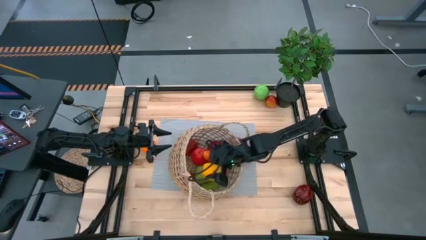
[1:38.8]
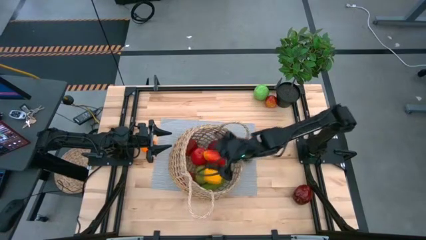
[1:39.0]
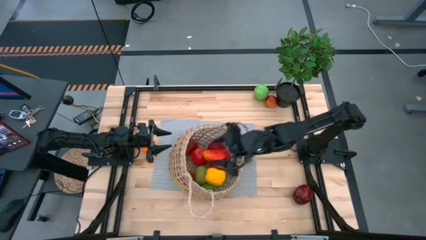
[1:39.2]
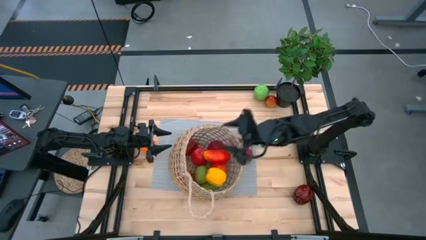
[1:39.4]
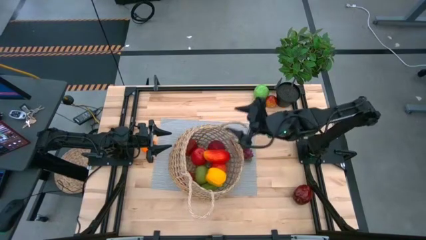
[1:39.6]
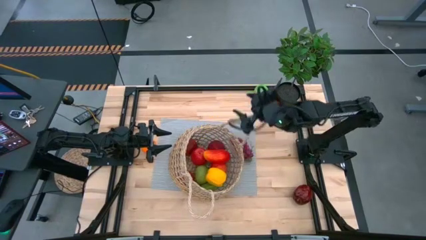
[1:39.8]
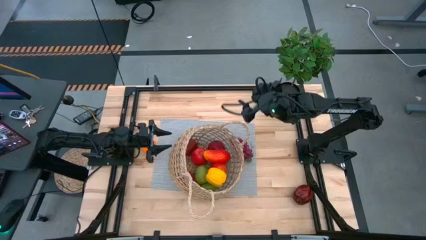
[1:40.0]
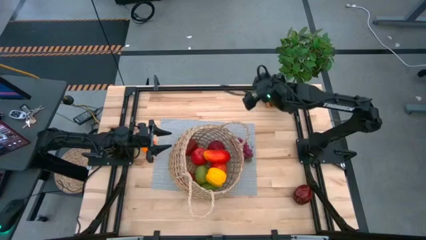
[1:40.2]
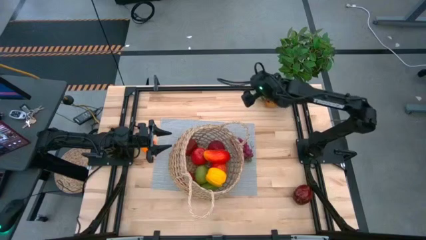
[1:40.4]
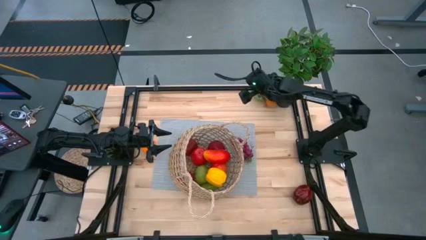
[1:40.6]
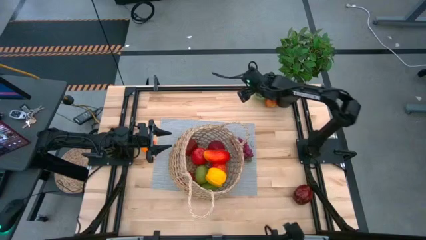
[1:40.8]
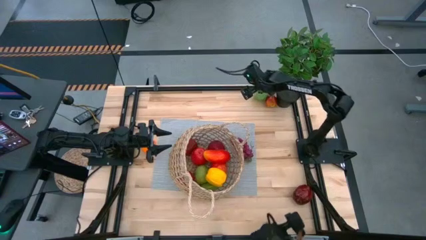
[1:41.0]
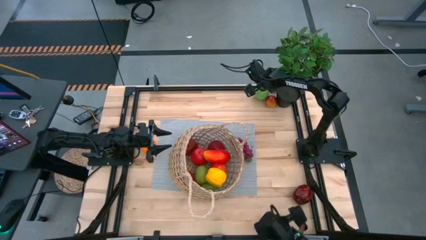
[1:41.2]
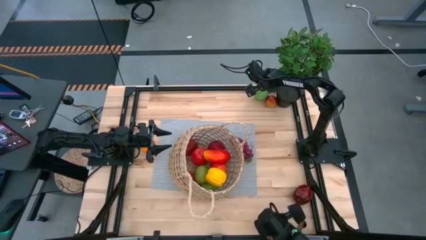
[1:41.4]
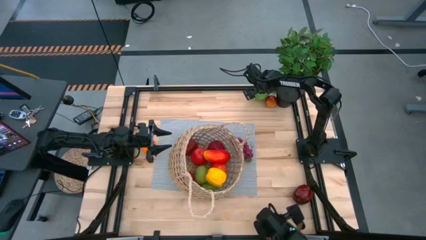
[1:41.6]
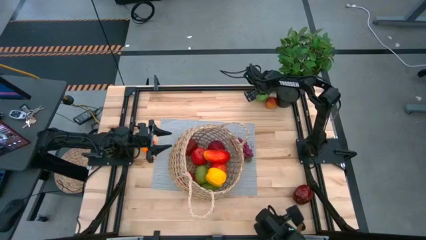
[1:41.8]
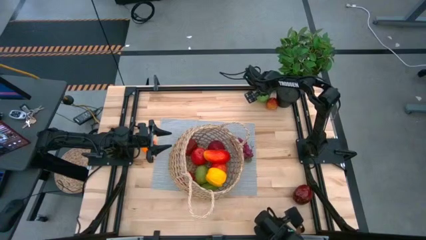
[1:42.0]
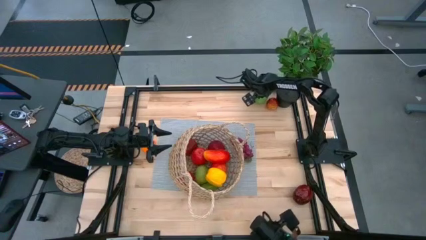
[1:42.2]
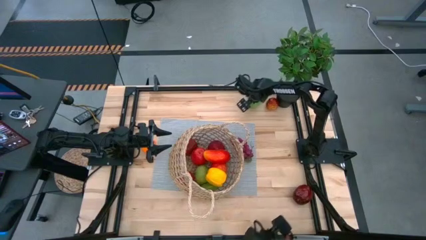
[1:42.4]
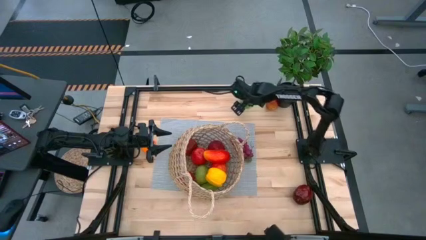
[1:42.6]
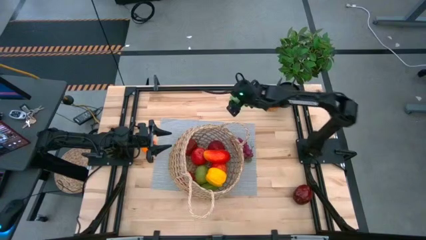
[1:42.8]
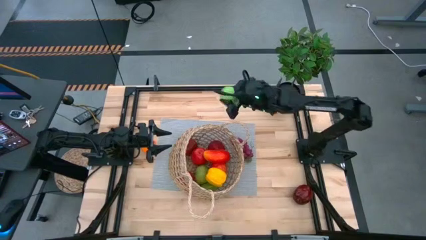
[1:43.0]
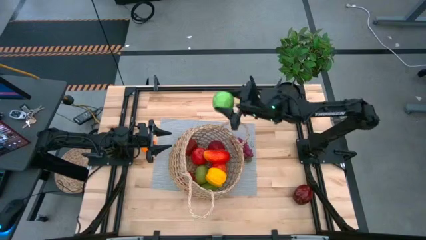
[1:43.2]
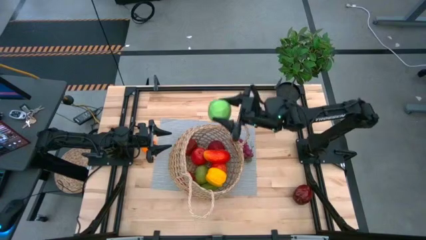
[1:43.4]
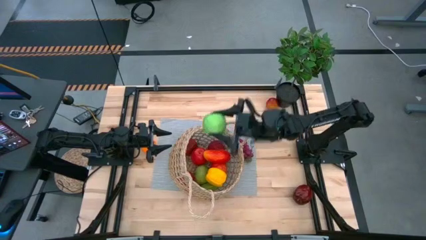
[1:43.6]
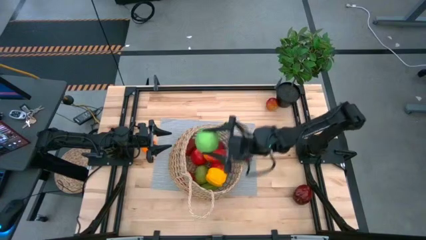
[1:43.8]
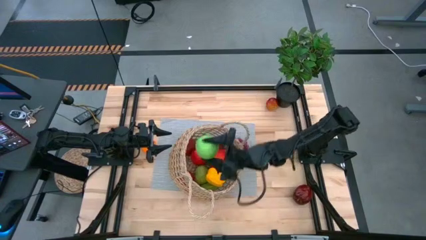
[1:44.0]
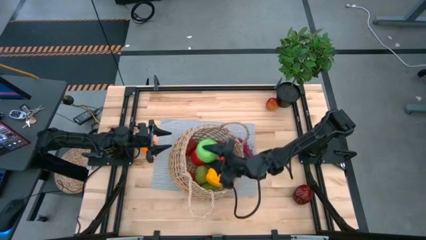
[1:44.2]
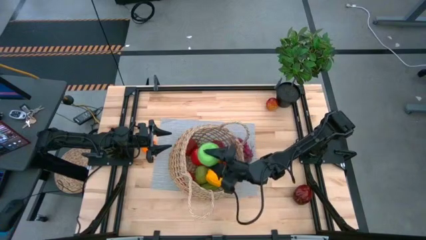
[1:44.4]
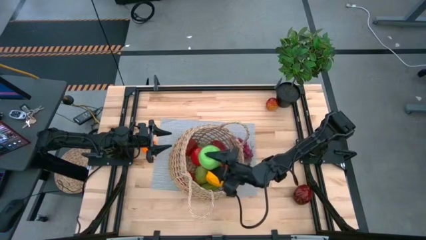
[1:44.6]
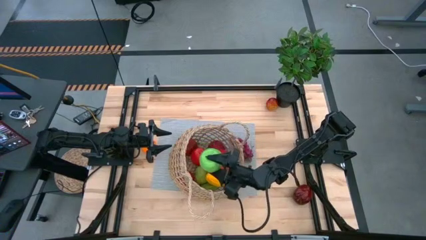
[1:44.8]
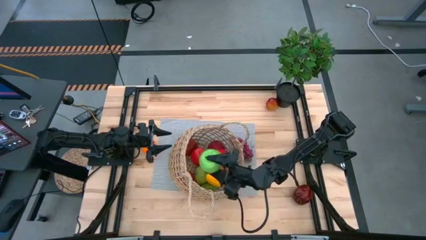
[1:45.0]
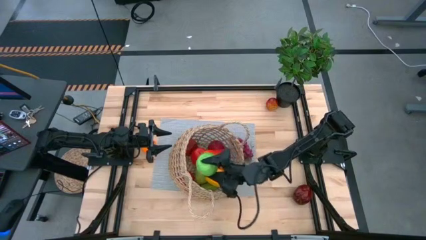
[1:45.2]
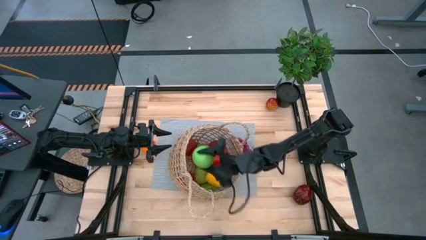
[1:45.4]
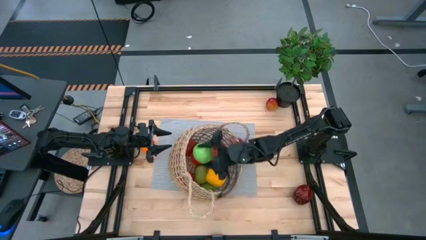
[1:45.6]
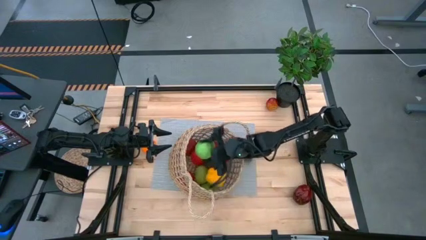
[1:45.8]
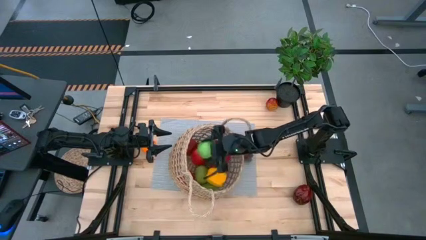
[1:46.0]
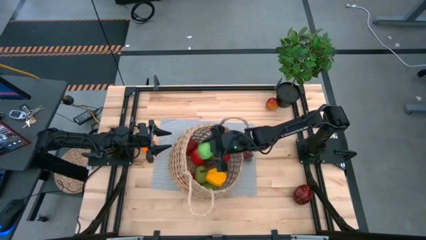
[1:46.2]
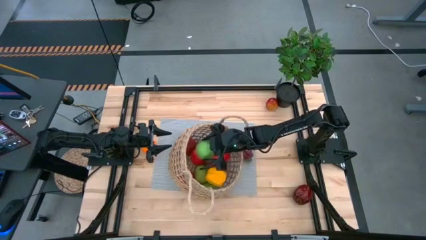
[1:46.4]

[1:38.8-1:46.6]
Task: Build produce basket
Put the apple into the basket

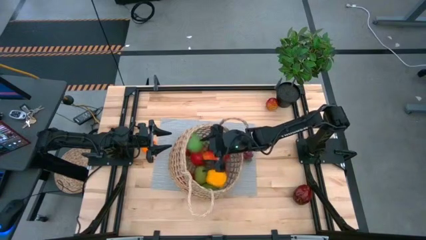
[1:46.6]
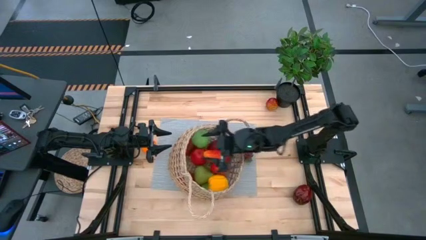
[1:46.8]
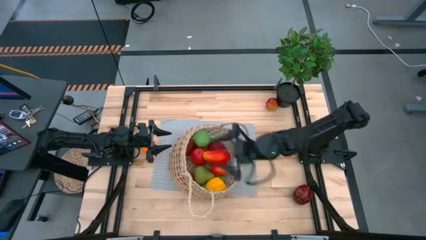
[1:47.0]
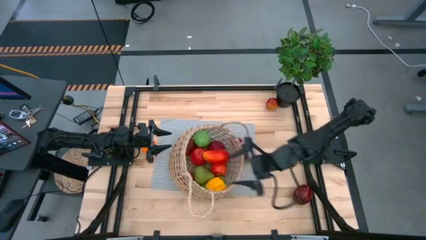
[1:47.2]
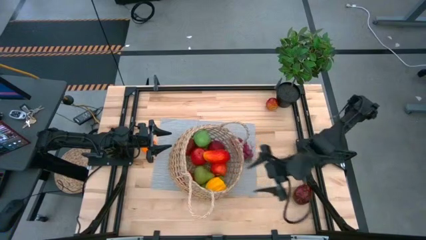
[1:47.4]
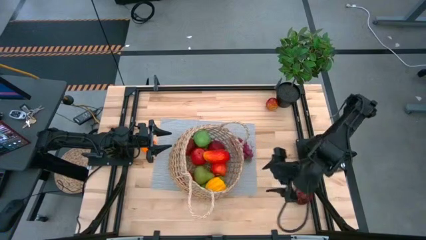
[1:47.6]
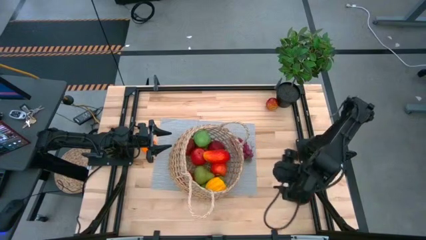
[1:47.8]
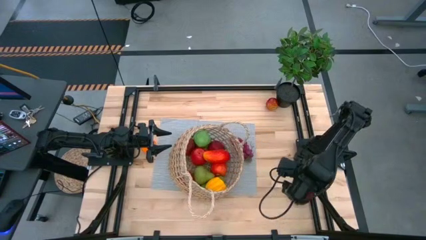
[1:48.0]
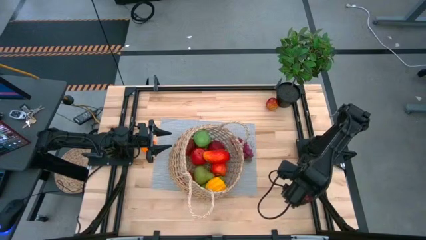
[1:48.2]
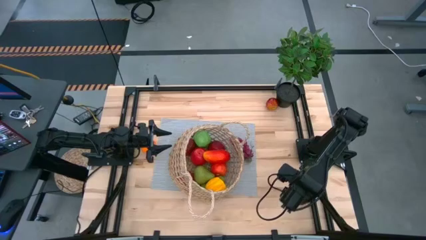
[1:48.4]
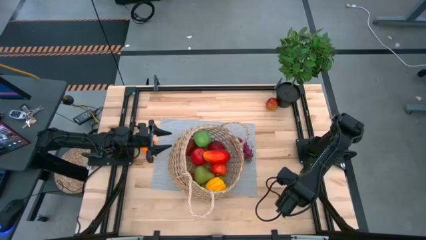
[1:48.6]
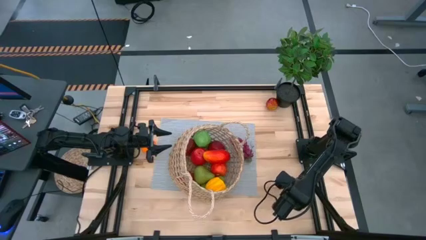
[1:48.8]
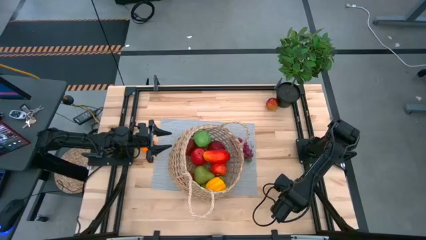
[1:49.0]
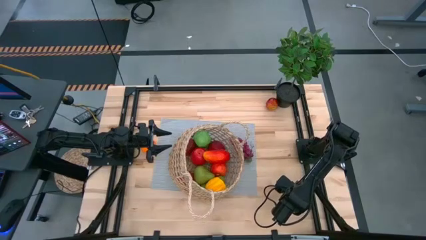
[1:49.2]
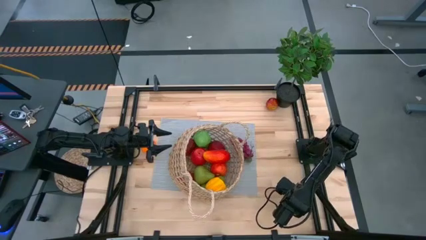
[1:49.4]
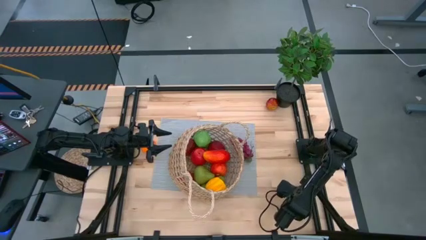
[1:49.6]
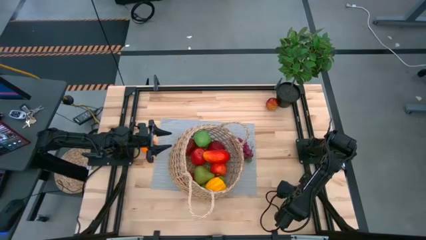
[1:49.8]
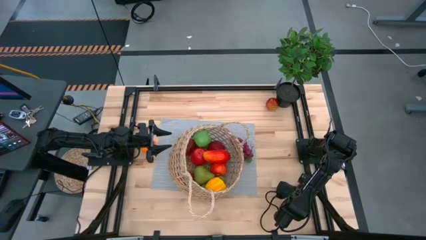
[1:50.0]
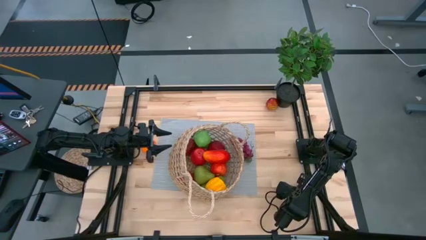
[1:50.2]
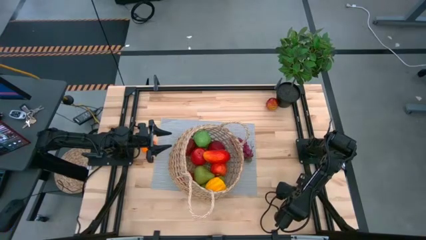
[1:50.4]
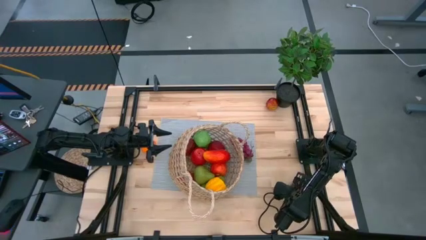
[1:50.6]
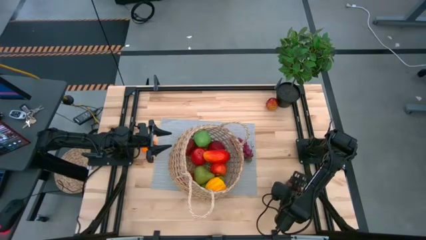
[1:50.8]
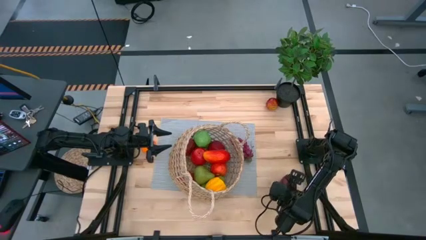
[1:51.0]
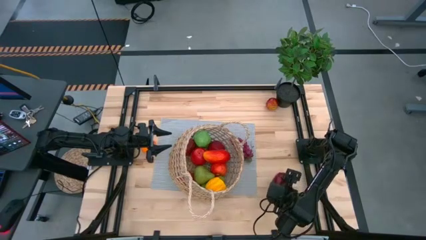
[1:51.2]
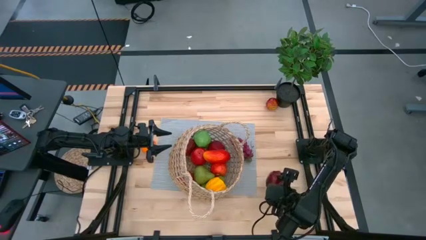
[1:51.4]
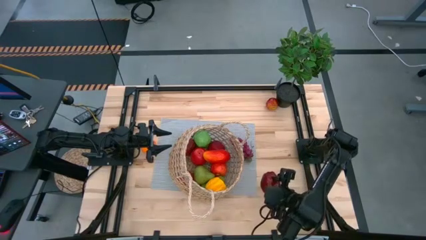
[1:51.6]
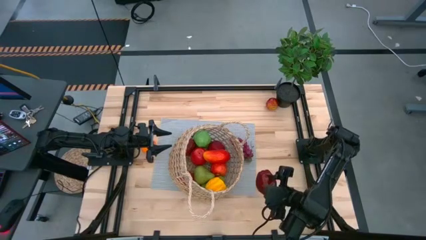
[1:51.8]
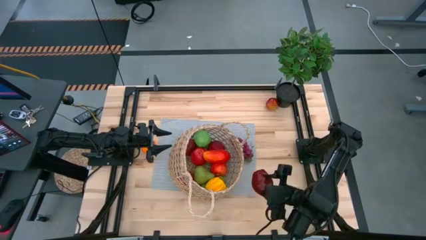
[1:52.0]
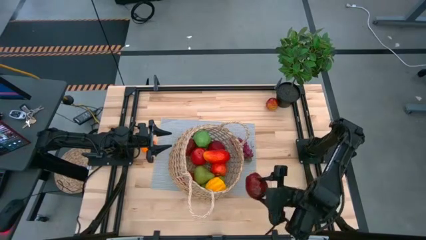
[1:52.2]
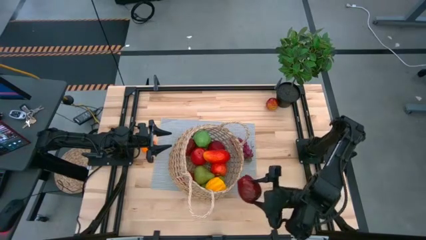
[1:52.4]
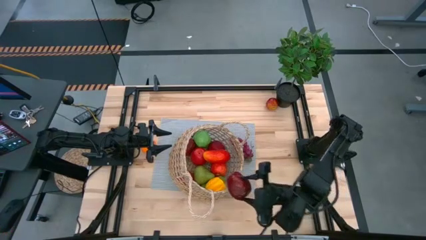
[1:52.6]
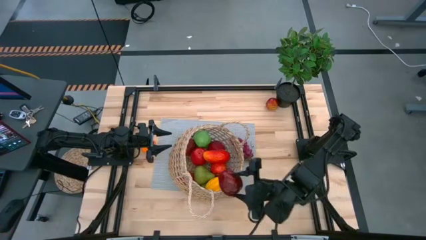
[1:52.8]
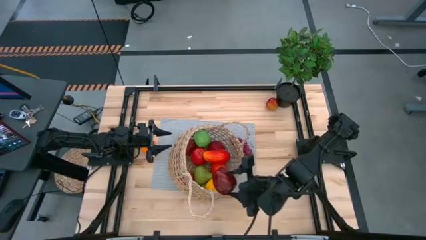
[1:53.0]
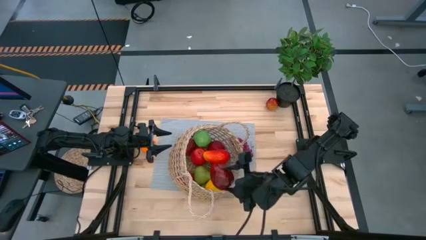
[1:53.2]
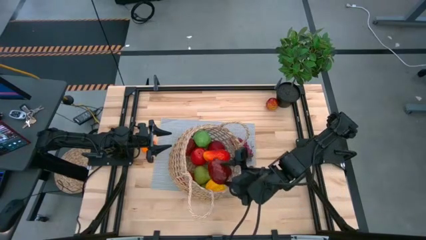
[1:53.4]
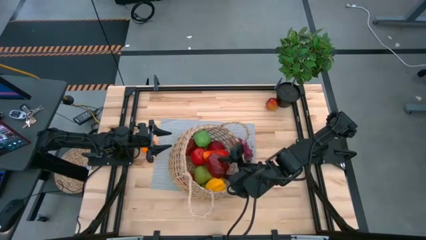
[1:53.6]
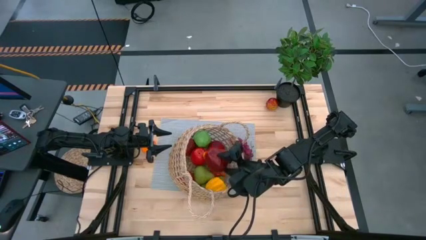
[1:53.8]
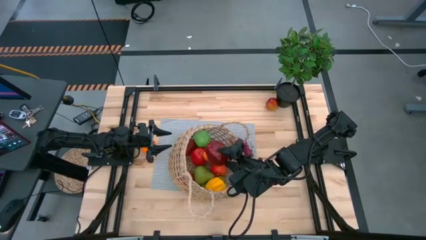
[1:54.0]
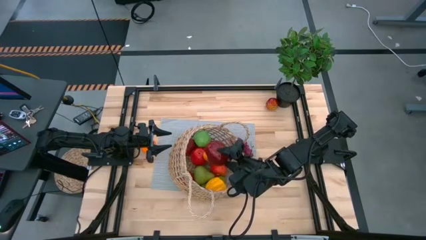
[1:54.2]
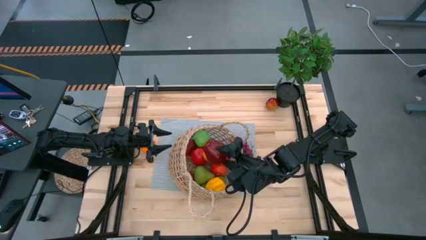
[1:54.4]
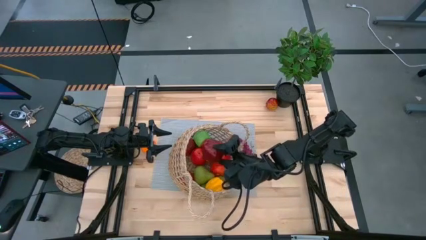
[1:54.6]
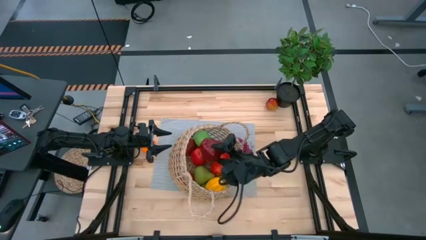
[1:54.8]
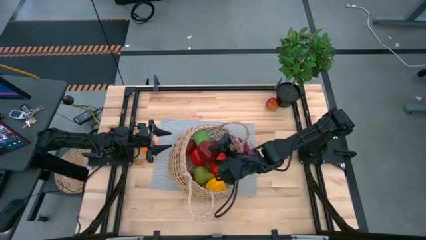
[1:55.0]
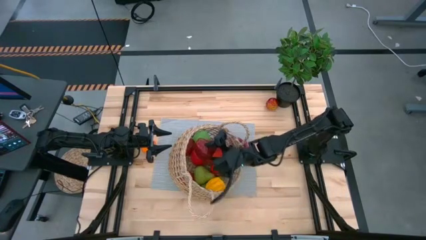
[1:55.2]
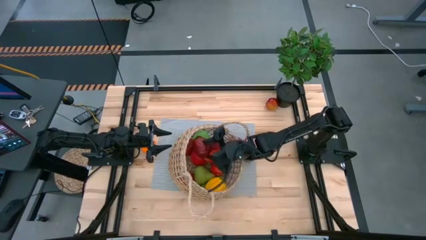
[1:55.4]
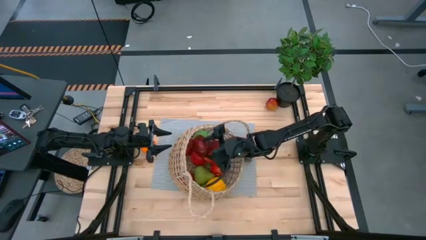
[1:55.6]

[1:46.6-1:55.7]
Put the apple into the basket
